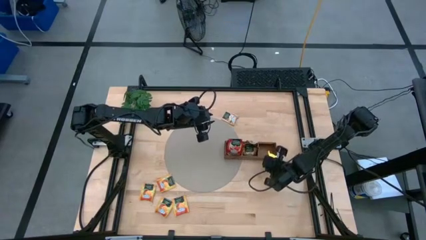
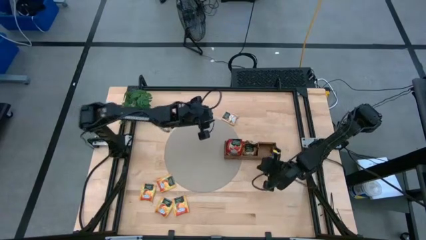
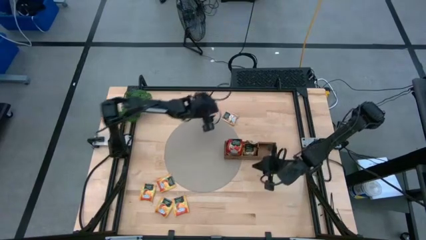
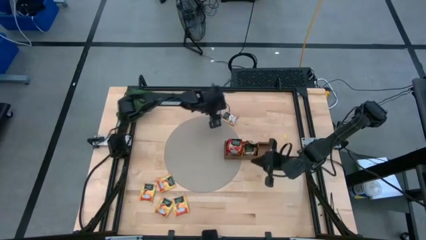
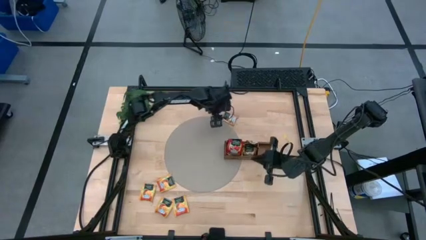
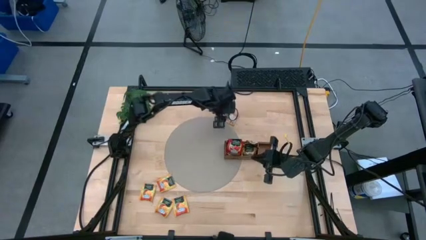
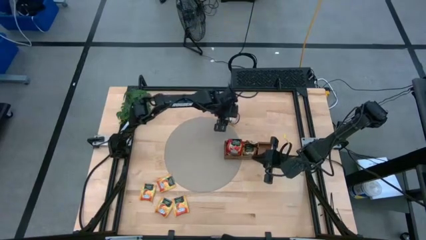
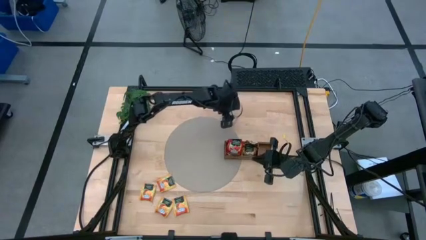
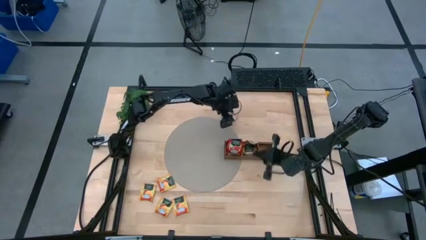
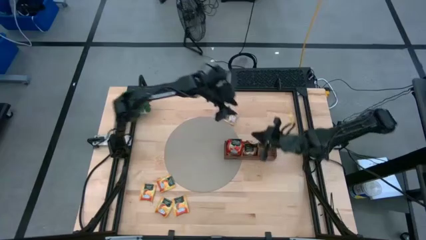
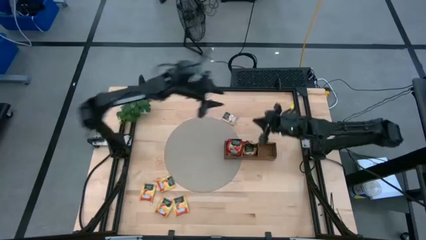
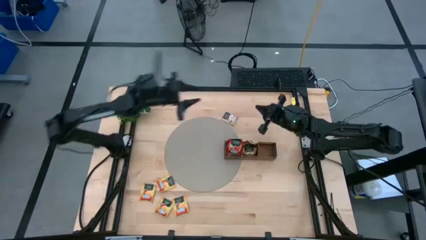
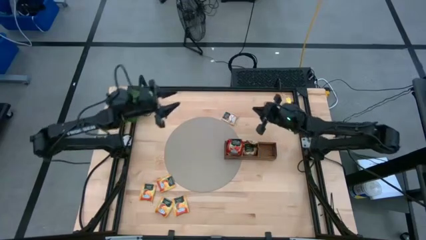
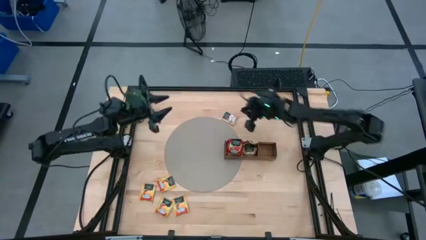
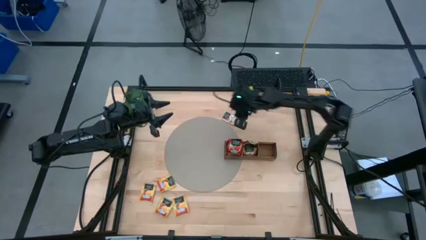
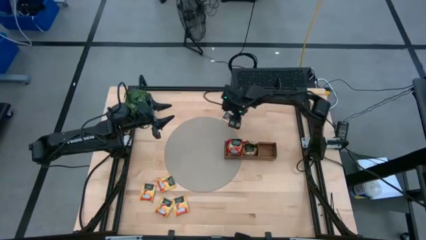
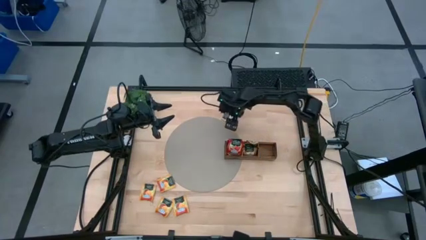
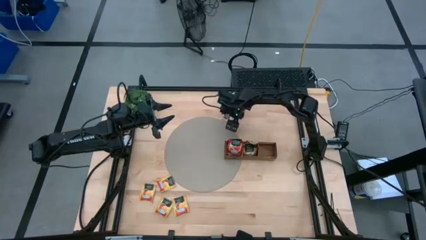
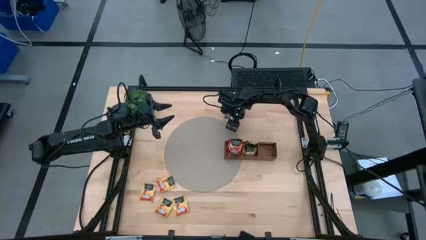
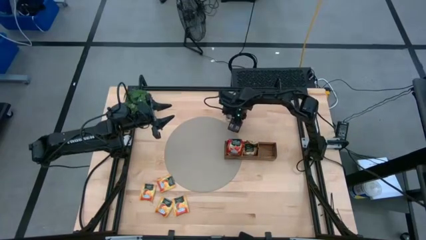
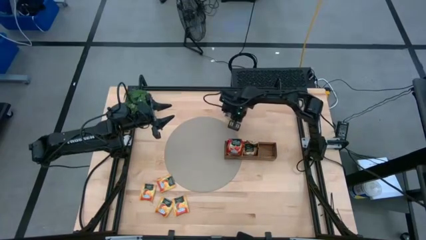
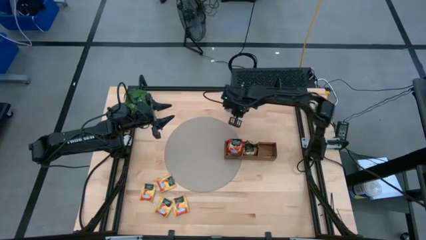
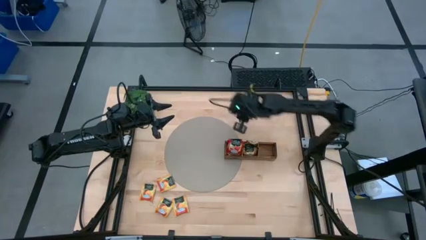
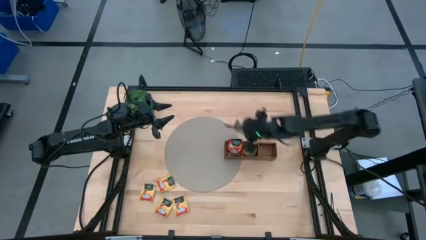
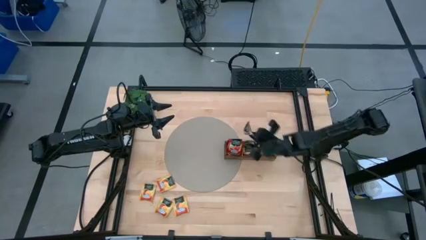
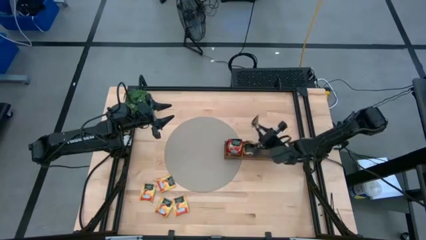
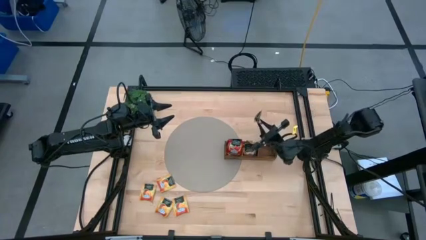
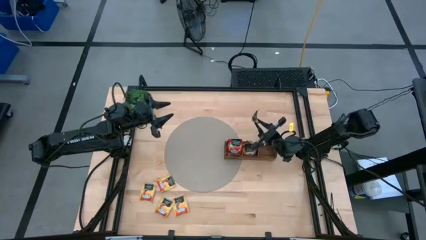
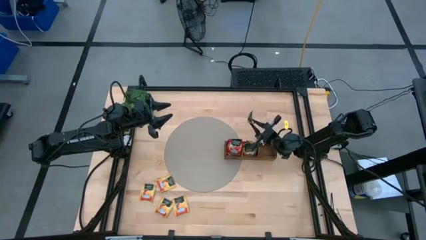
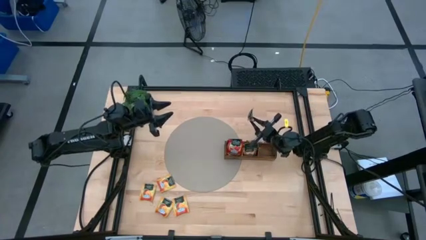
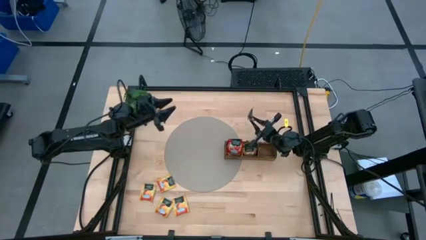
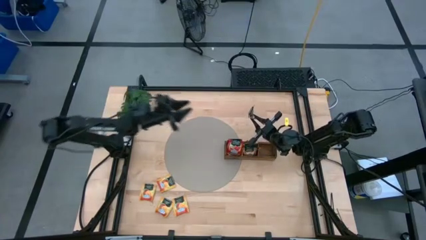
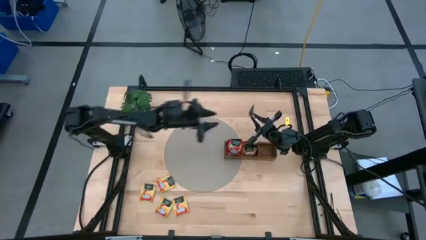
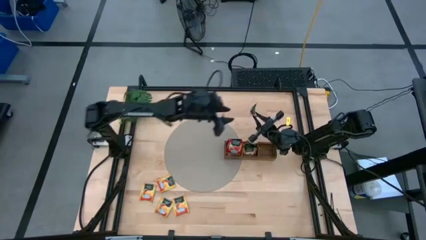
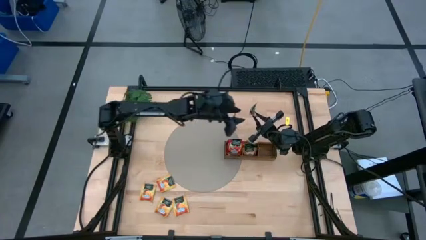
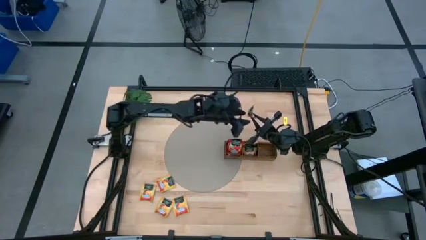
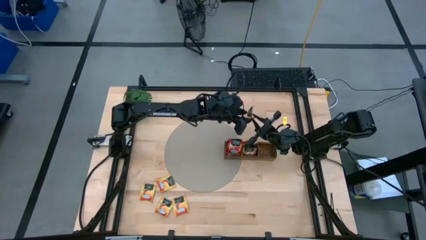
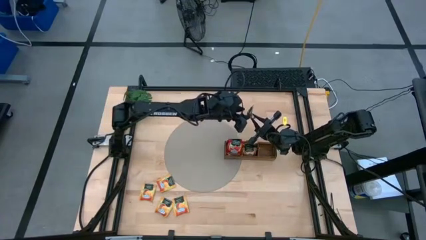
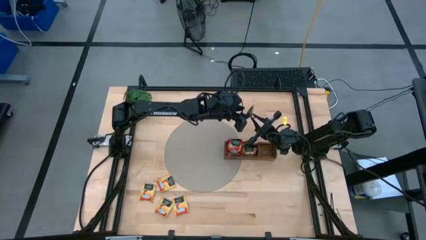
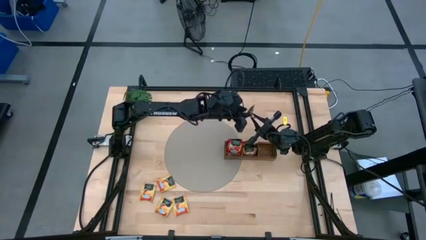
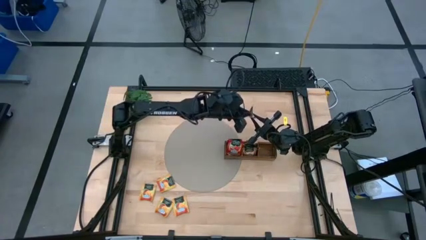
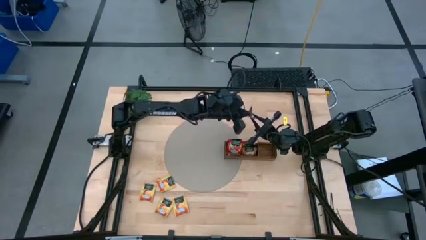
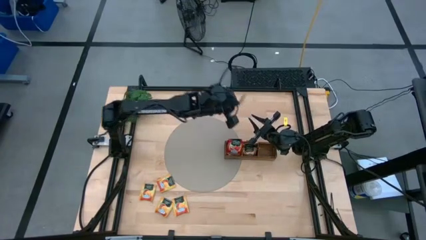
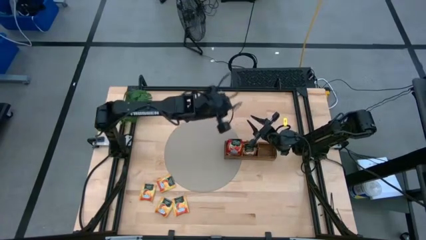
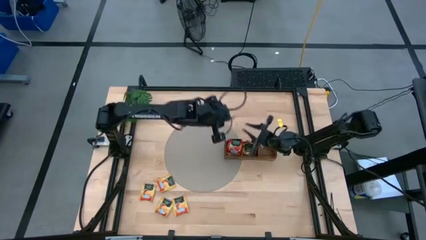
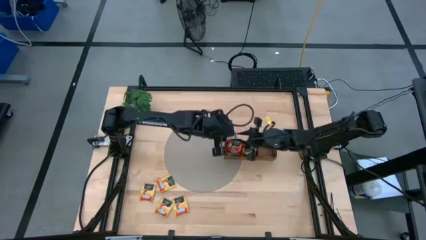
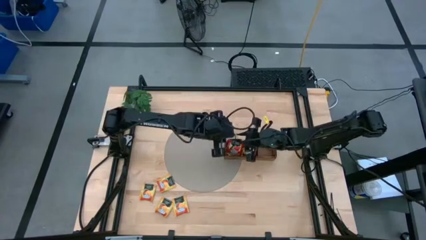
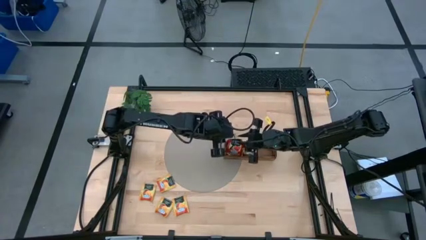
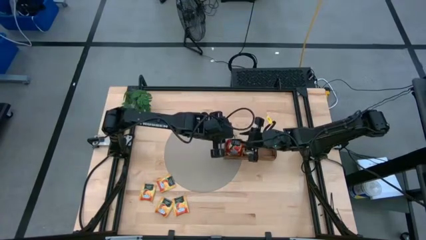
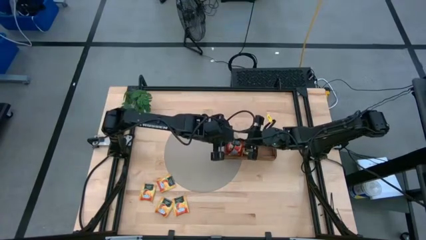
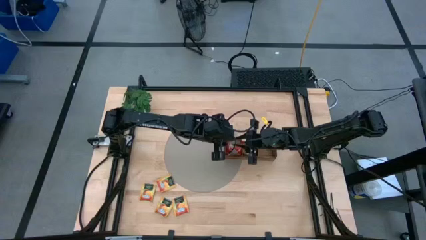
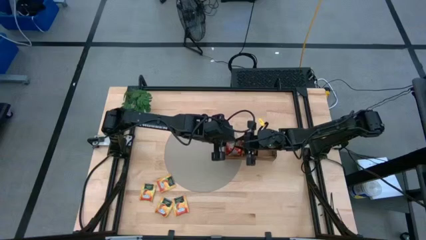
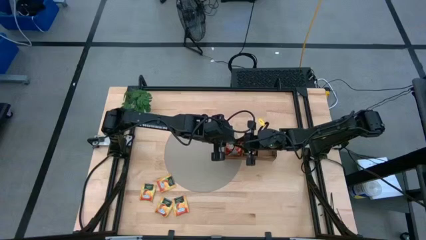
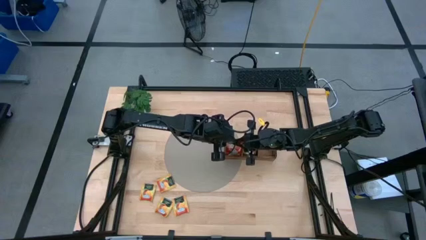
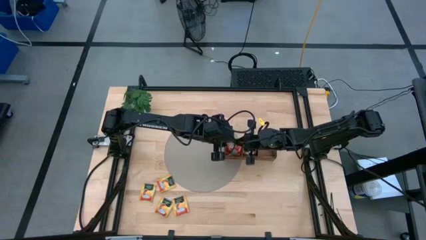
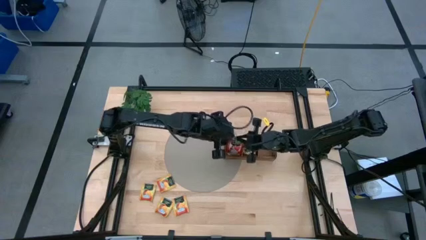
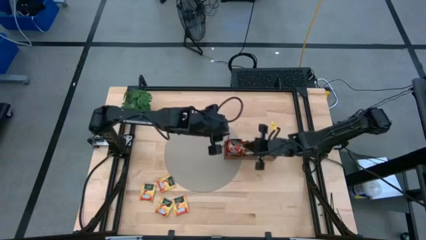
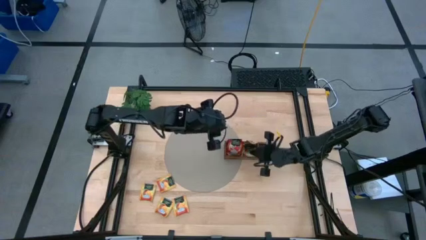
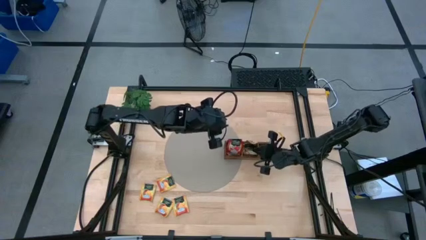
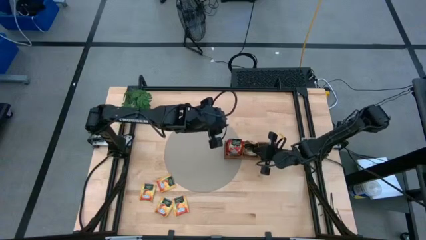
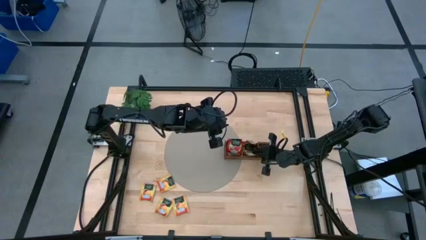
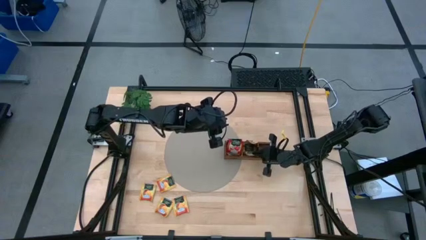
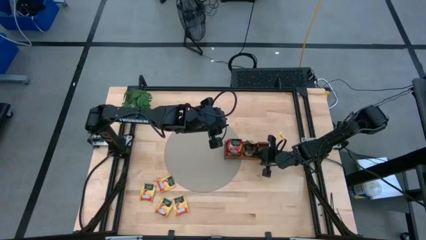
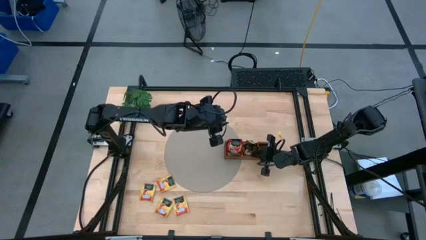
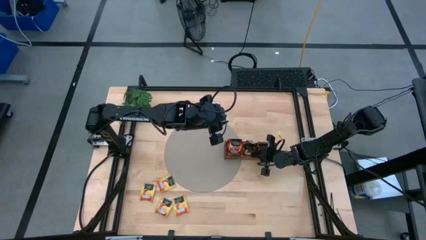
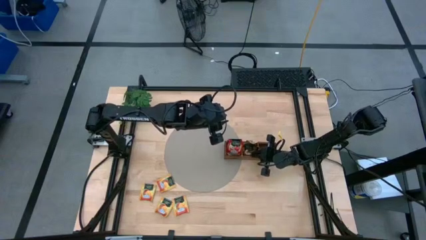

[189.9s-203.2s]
Task: Pick & Place Tea
Put the brown tea bag into the middle section of the wooden organizer

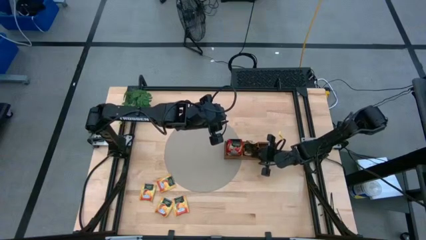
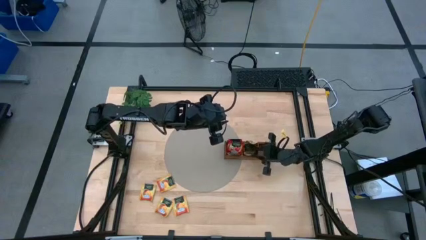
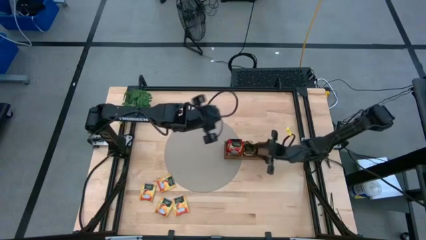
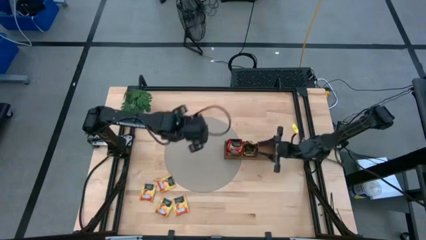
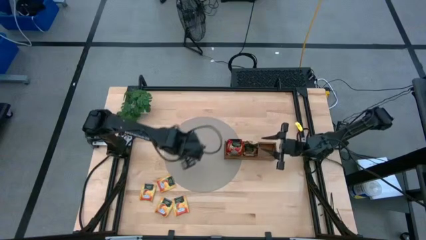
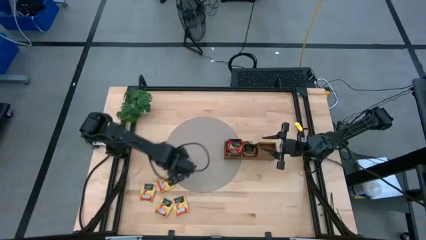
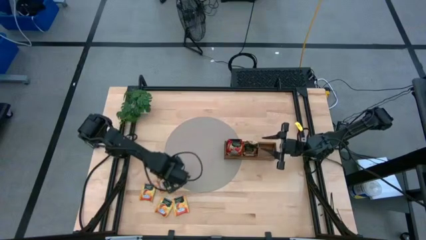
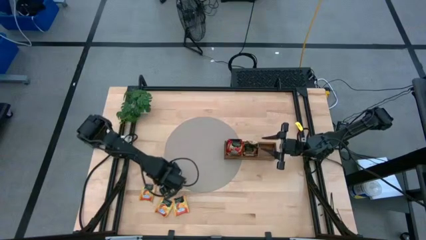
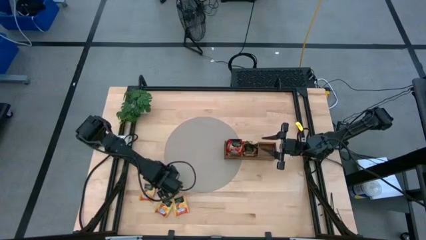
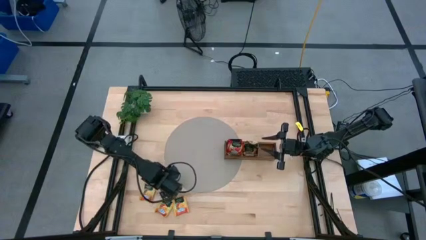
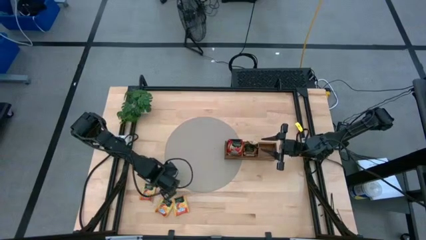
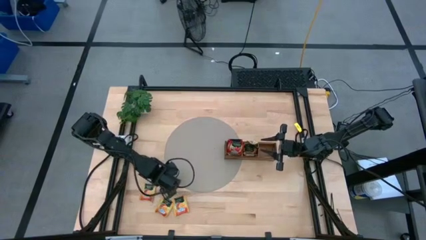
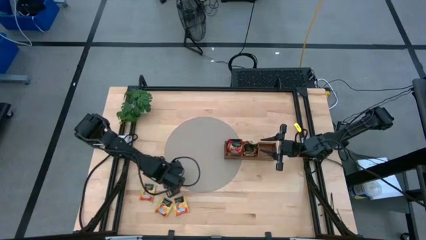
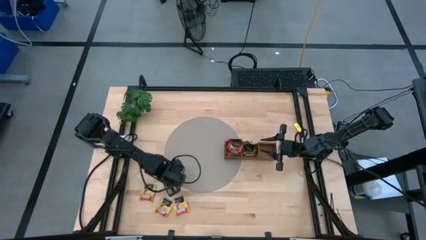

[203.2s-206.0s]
Put the yellow tea bag into the right section of the wooden organizer

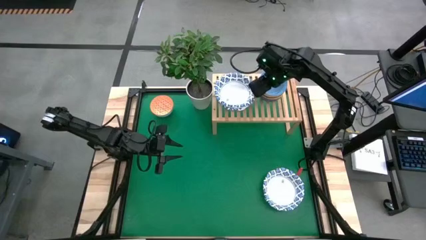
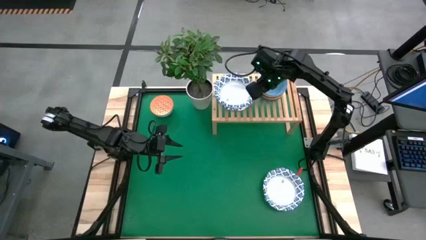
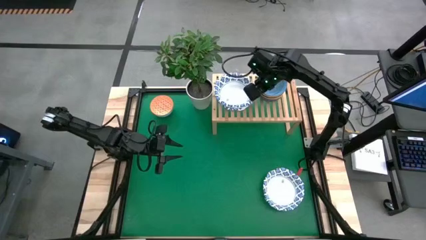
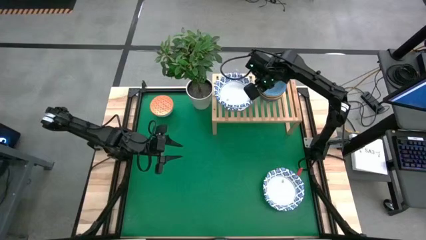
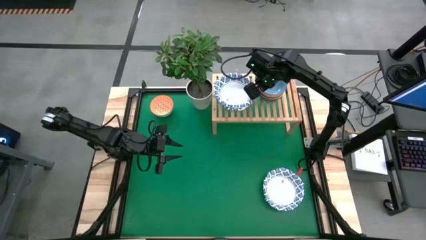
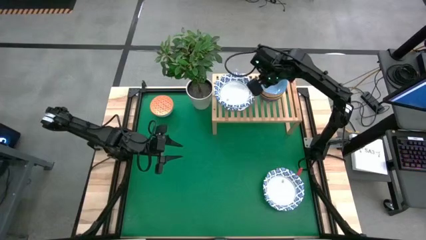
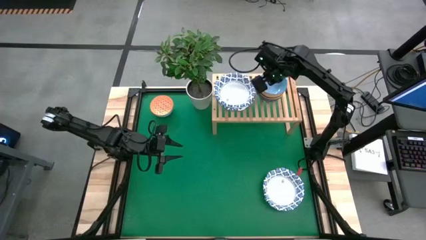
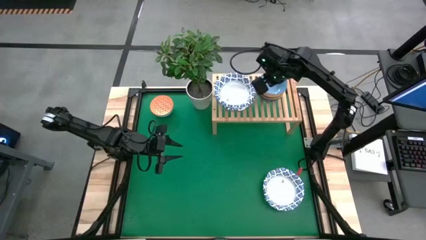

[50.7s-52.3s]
Task: Place and stack bowls onto a shelf
Adjust the light blue bowl
